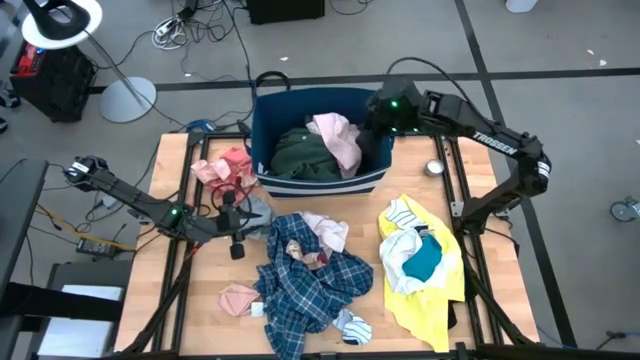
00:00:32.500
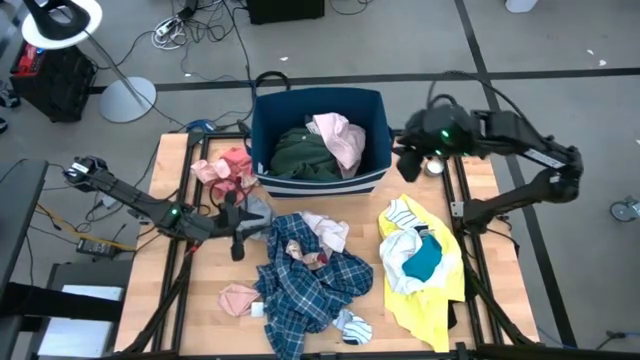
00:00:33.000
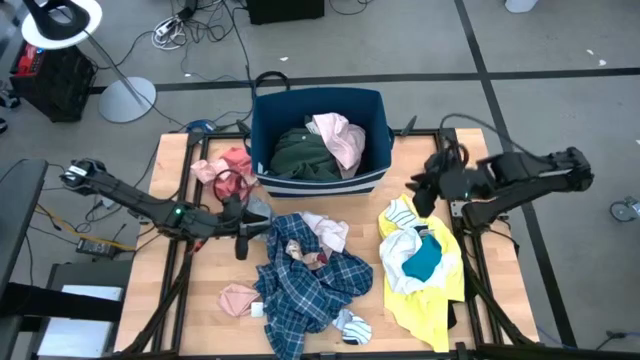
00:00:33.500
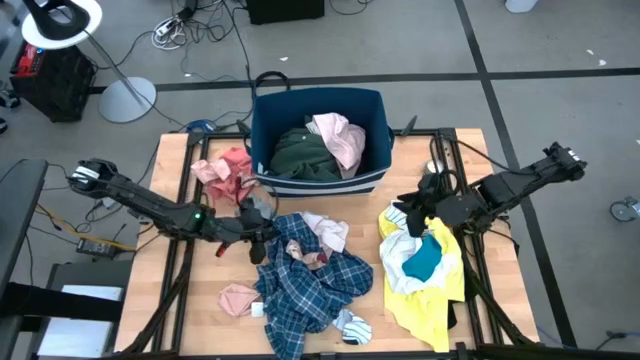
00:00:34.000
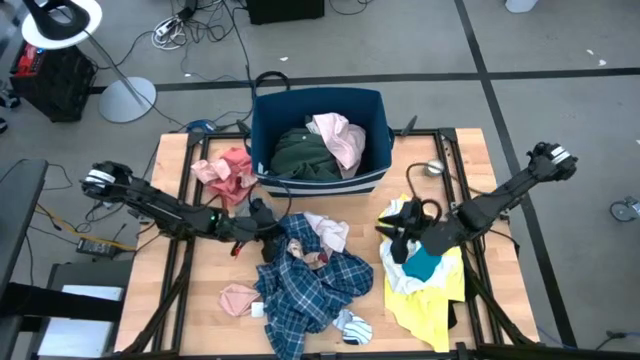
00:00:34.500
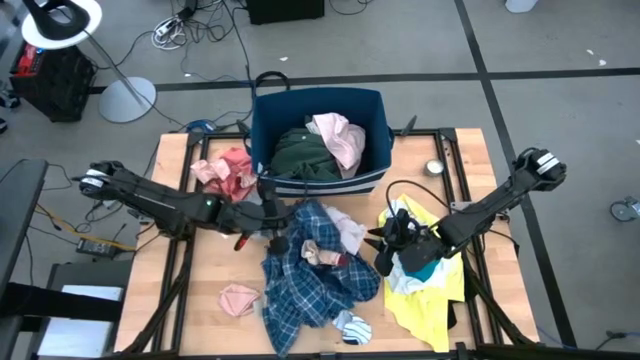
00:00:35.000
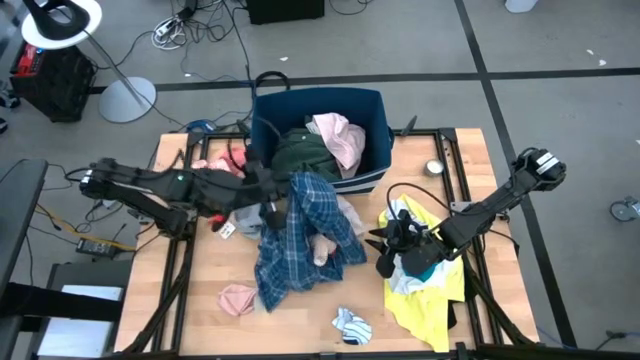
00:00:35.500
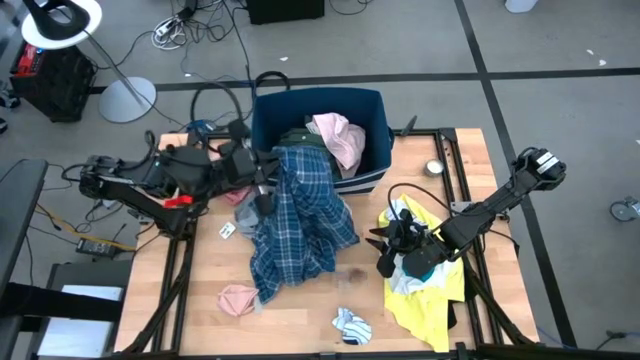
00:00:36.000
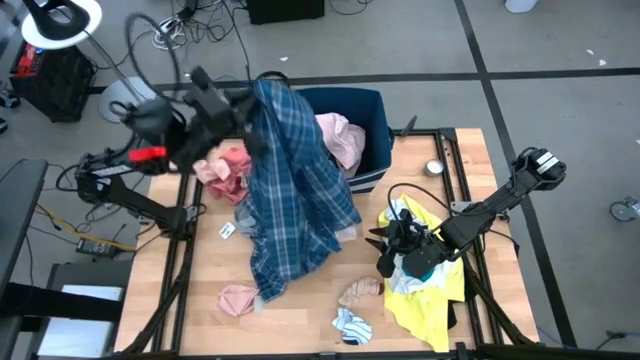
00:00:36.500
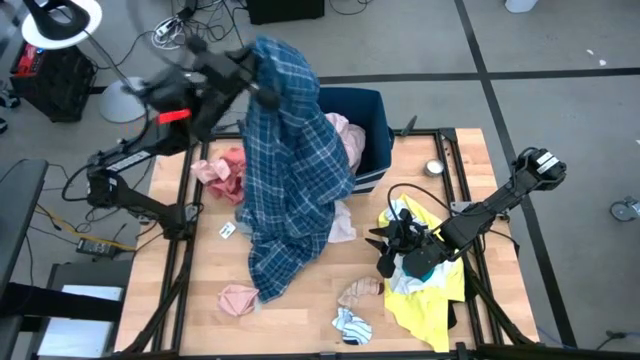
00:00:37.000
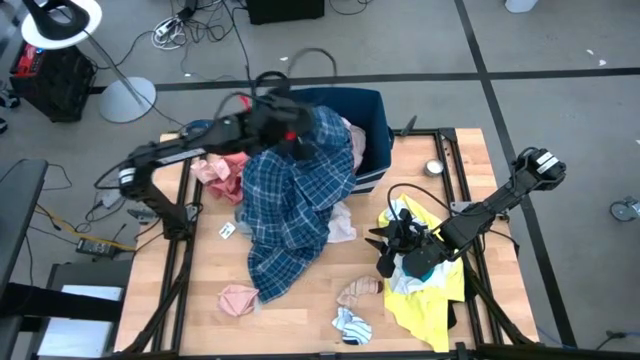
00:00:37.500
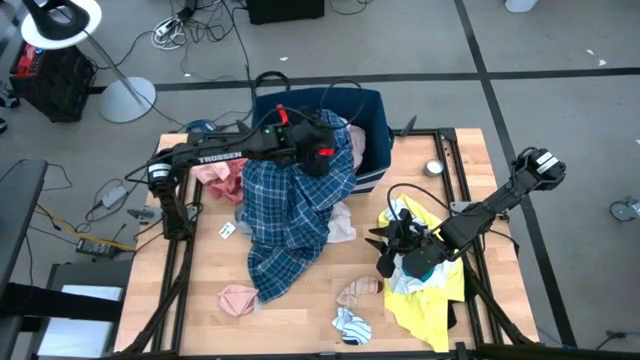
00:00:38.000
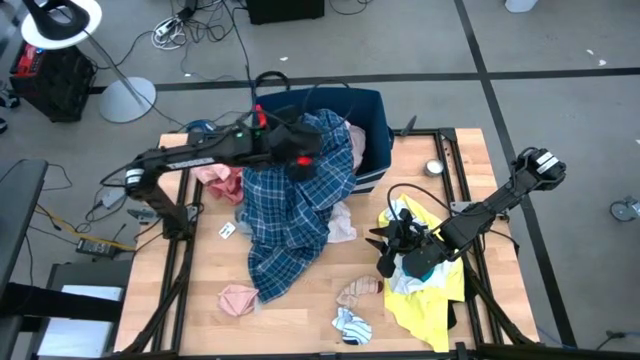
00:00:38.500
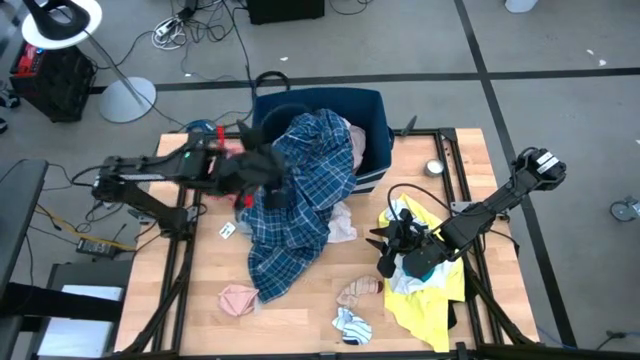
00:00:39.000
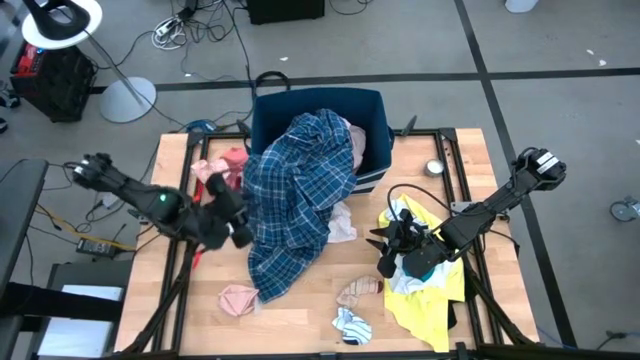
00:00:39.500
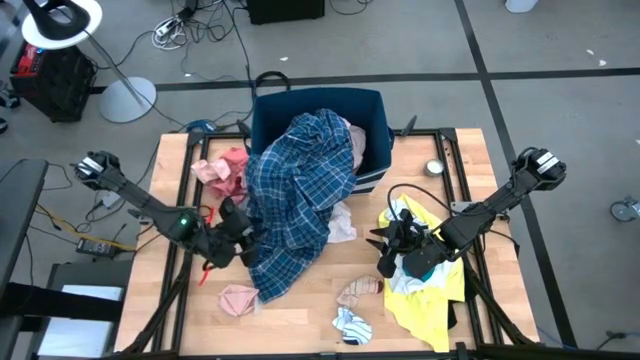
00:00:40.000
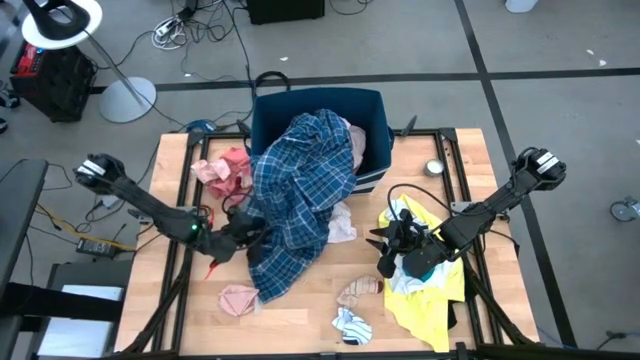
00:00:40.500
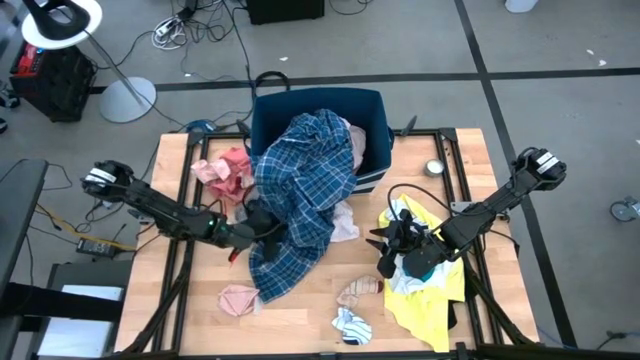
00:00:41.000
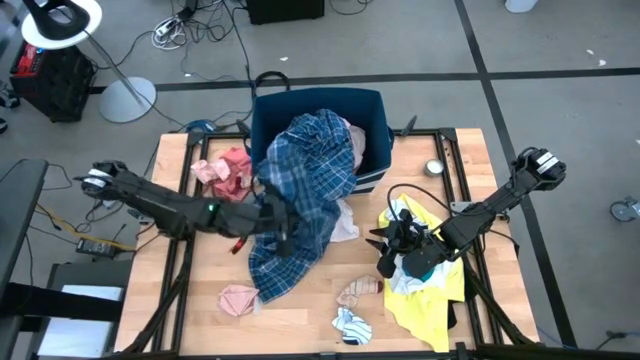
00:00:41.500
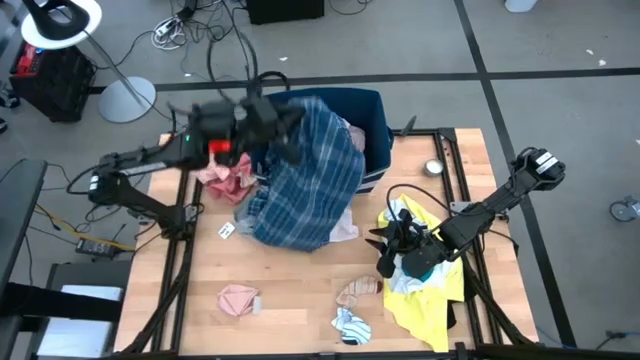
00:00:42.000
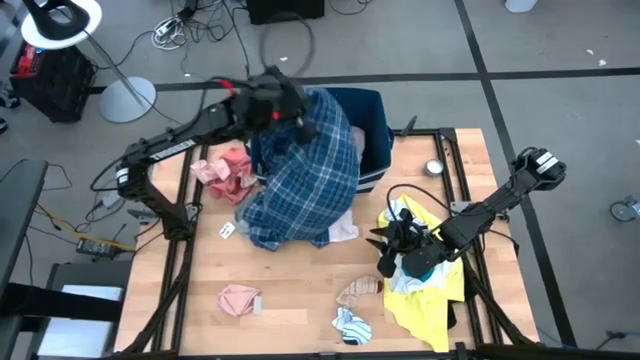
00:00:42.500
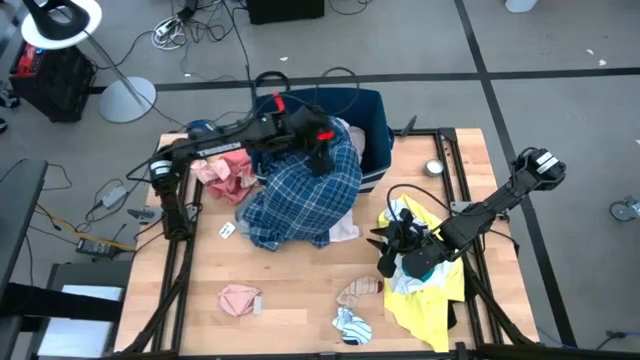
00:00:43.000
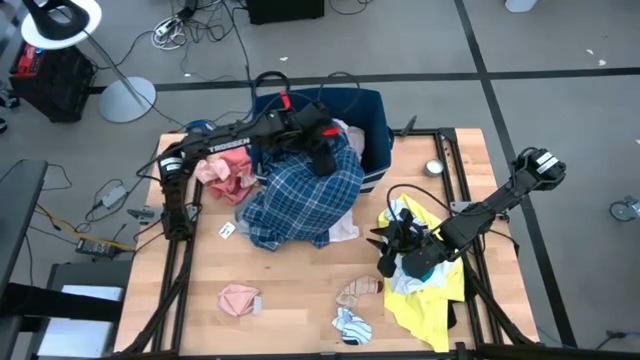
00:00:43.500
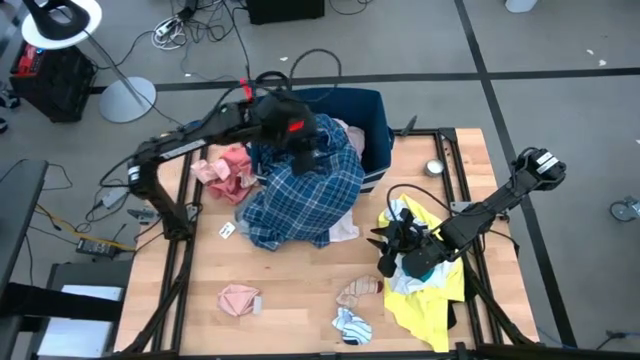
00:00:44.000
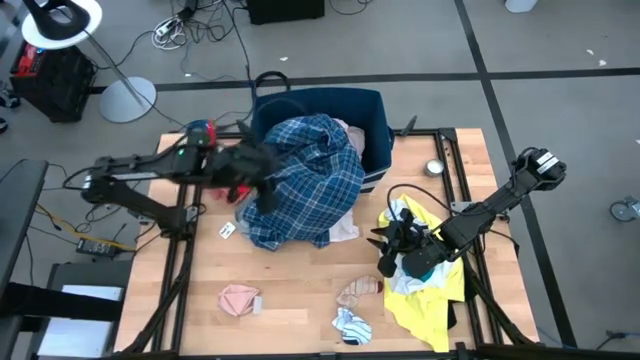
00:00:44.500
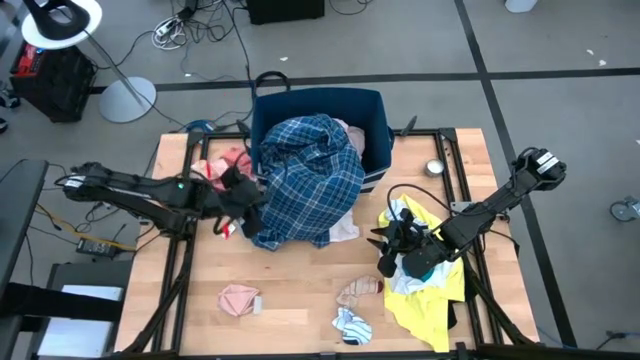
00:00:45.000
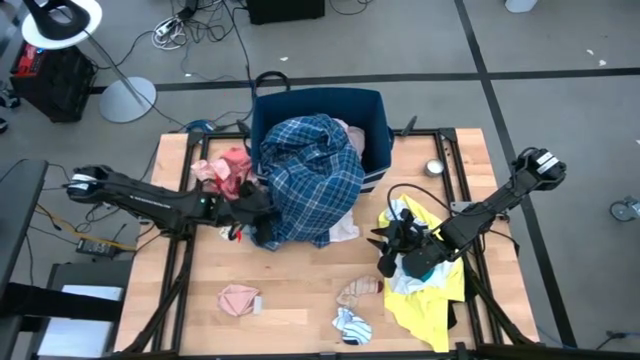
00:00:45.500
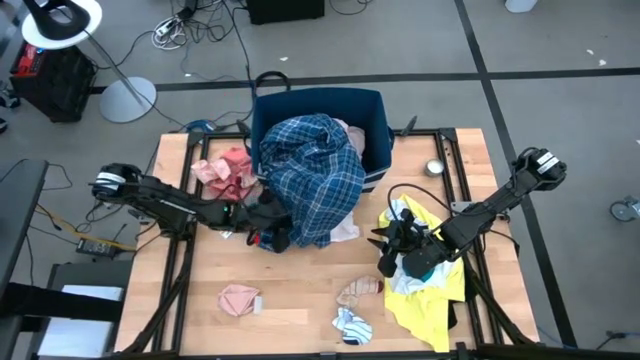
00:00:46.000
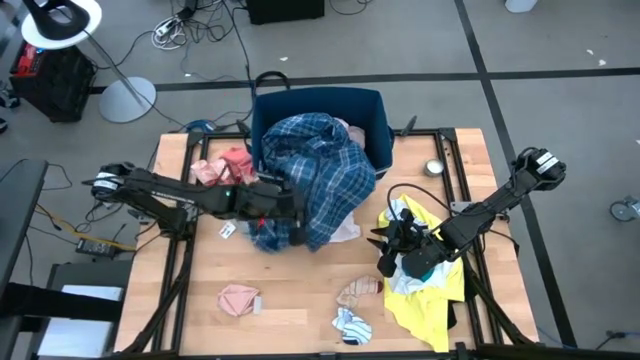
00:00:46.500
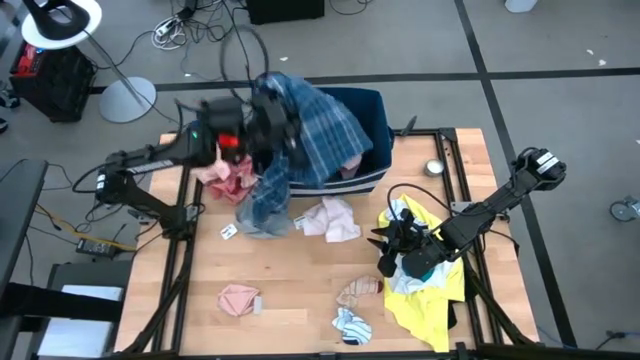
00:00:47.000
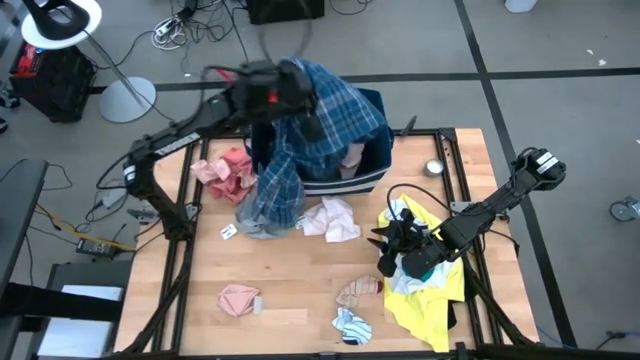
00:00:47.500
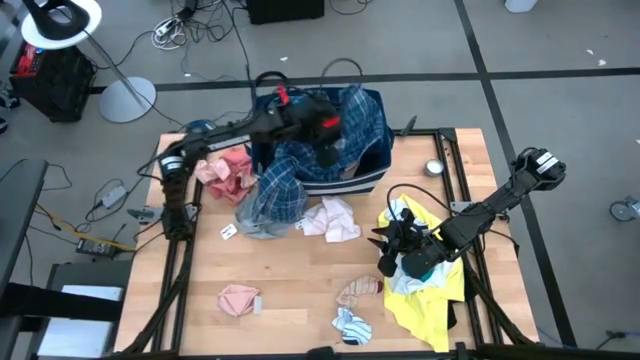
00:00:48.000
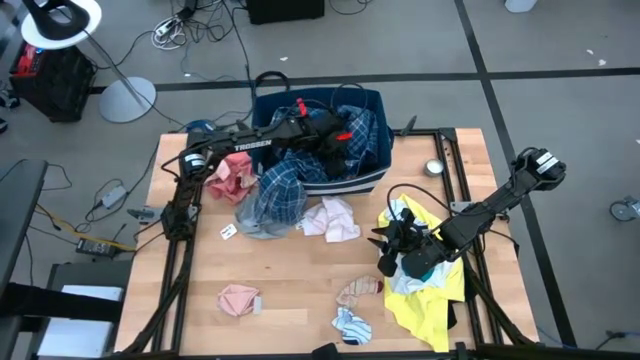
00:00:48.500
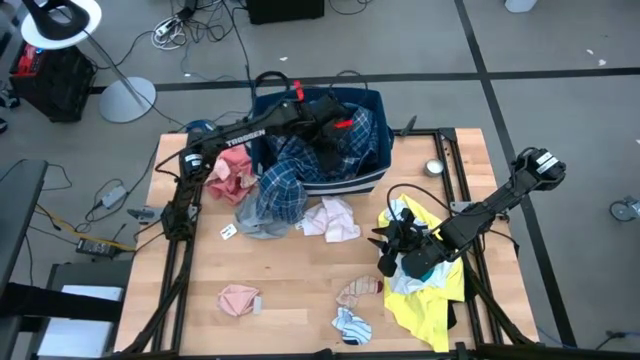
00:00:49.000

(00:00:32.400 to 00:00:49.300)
Task: Sort clothes
Put the blue checkered pants into the blue bin
